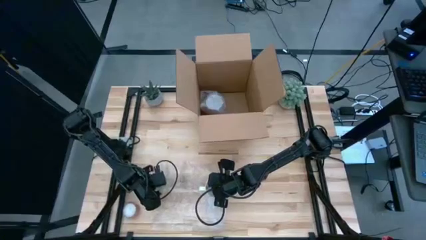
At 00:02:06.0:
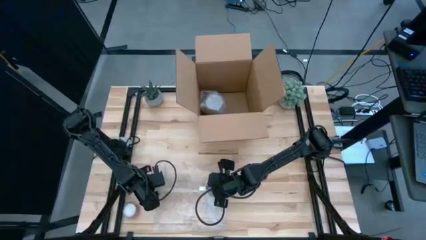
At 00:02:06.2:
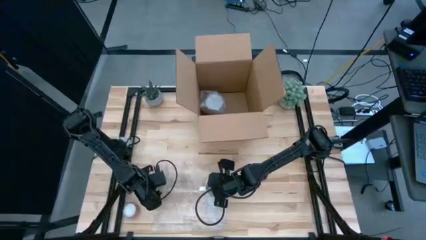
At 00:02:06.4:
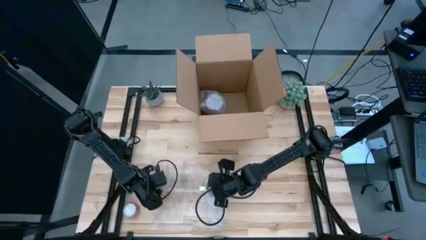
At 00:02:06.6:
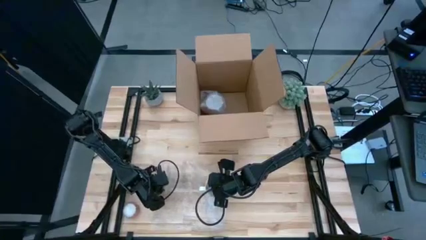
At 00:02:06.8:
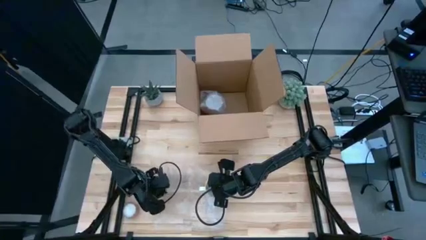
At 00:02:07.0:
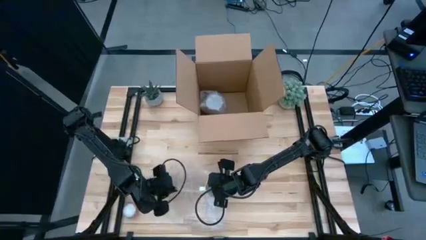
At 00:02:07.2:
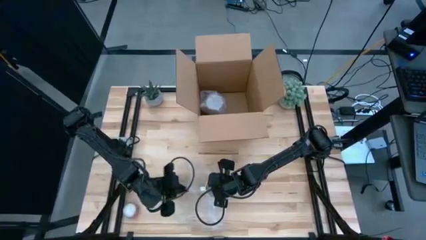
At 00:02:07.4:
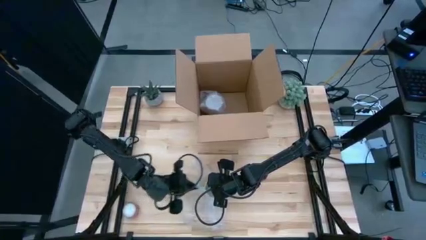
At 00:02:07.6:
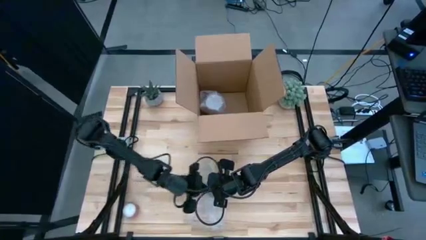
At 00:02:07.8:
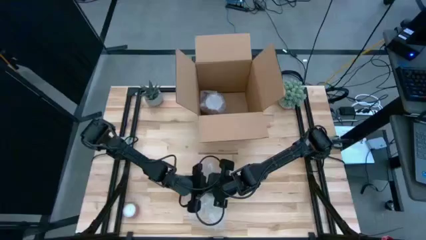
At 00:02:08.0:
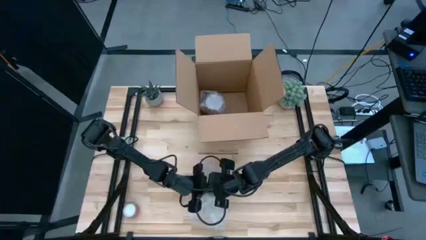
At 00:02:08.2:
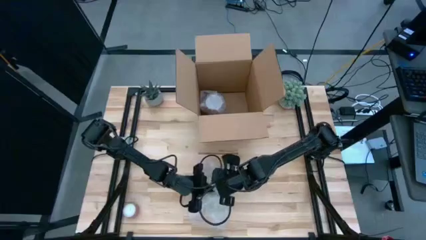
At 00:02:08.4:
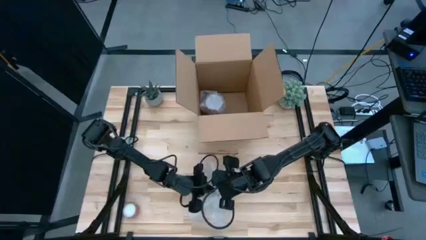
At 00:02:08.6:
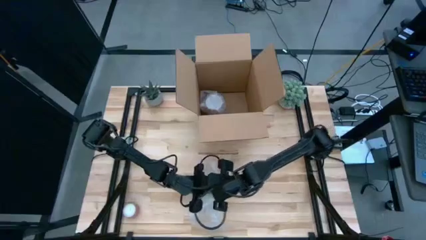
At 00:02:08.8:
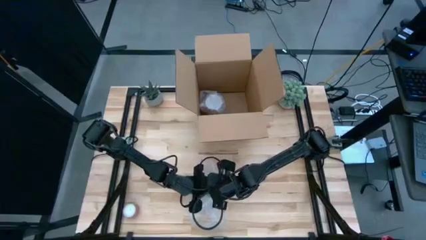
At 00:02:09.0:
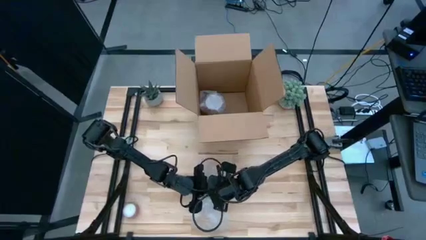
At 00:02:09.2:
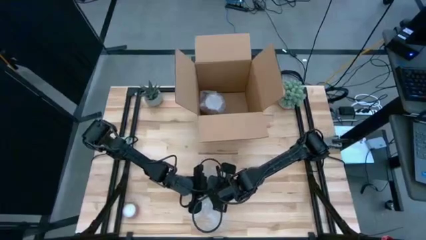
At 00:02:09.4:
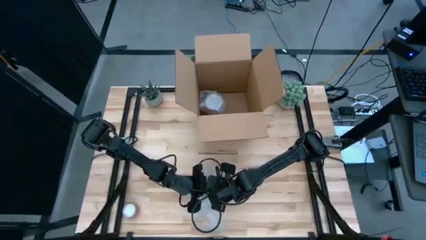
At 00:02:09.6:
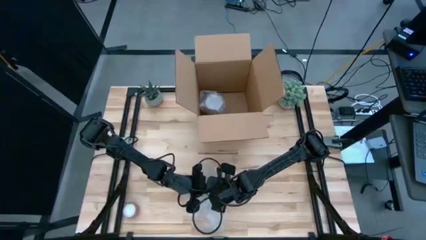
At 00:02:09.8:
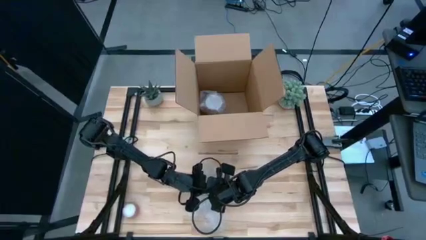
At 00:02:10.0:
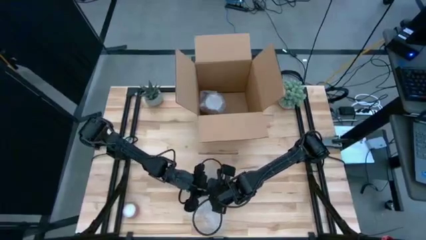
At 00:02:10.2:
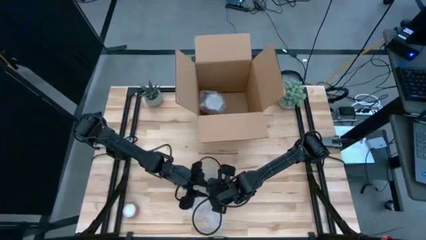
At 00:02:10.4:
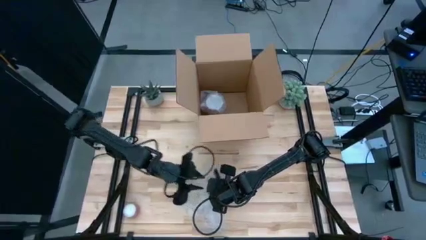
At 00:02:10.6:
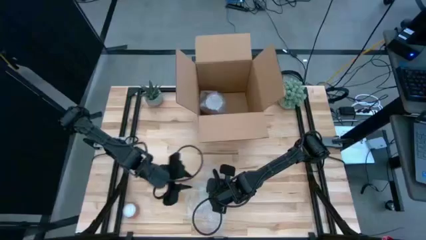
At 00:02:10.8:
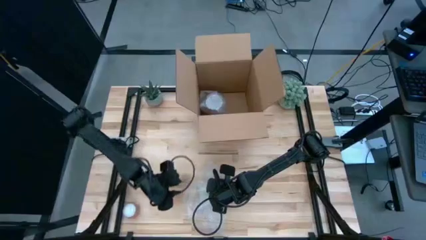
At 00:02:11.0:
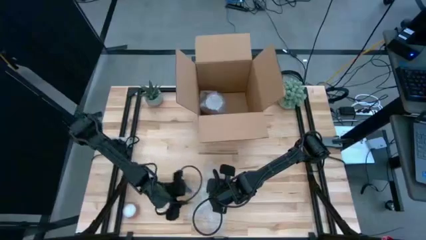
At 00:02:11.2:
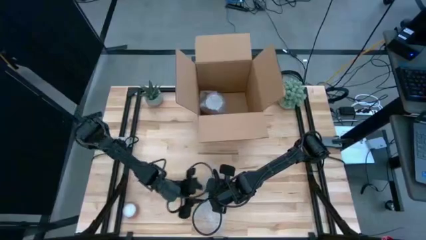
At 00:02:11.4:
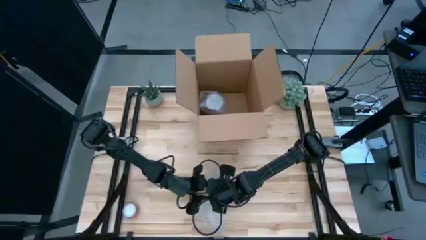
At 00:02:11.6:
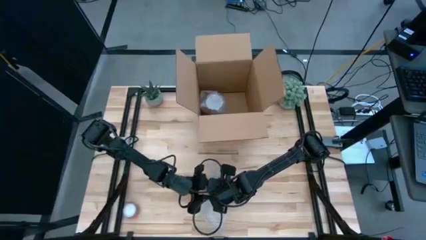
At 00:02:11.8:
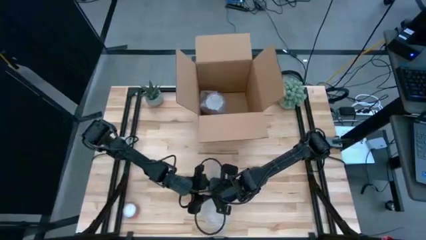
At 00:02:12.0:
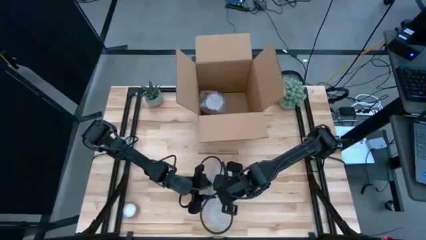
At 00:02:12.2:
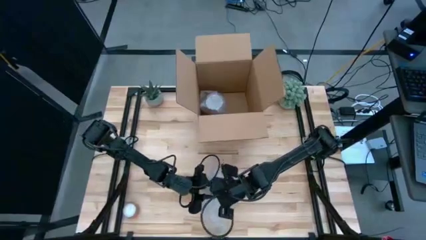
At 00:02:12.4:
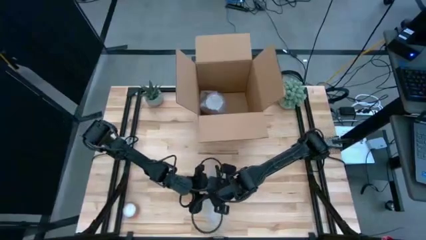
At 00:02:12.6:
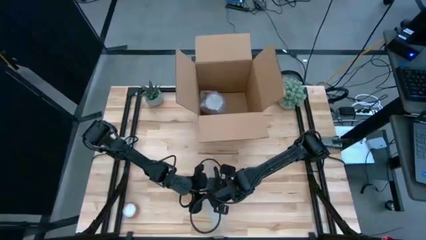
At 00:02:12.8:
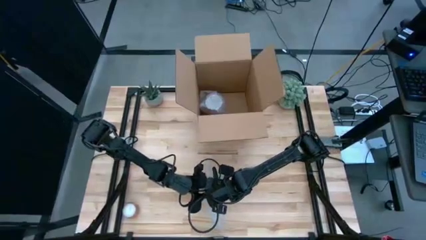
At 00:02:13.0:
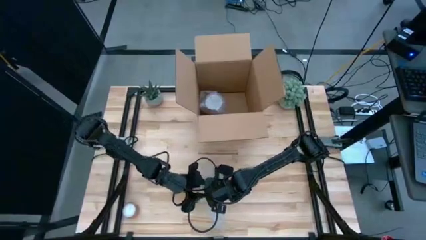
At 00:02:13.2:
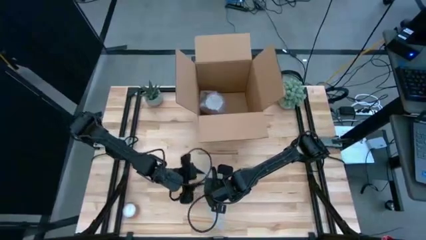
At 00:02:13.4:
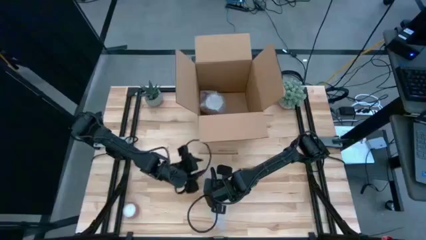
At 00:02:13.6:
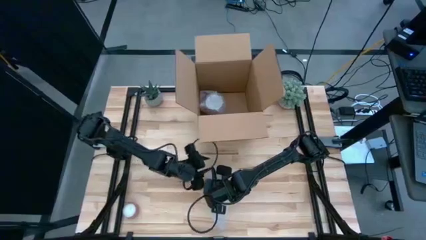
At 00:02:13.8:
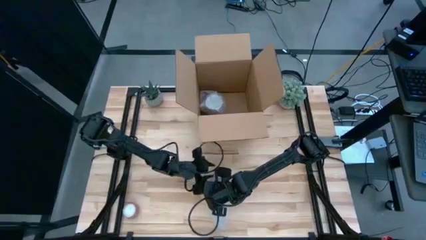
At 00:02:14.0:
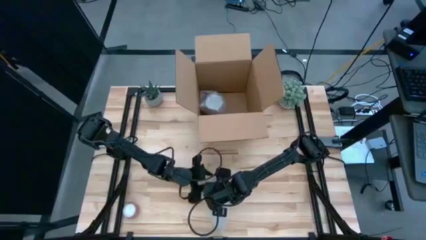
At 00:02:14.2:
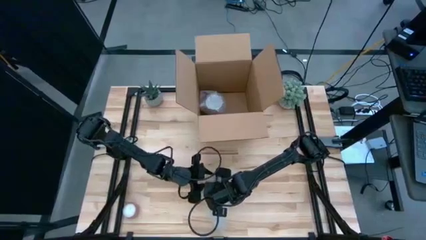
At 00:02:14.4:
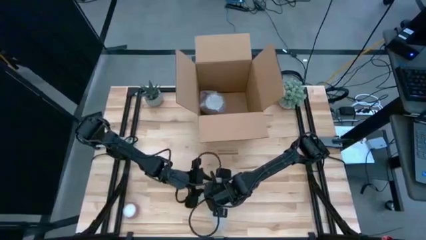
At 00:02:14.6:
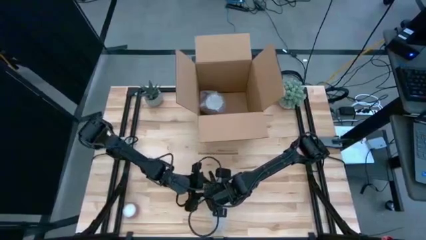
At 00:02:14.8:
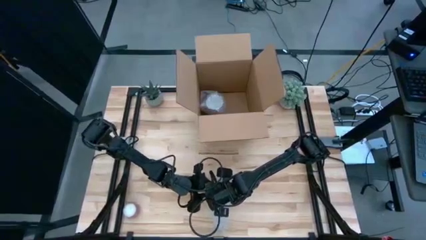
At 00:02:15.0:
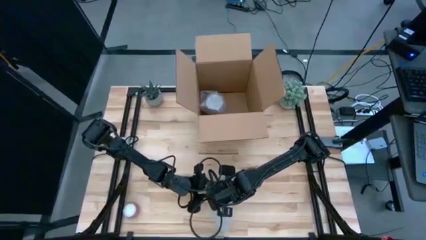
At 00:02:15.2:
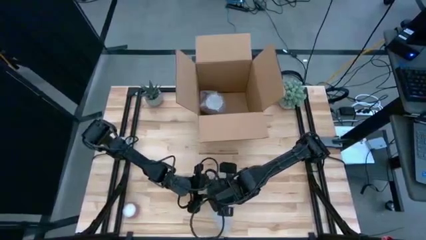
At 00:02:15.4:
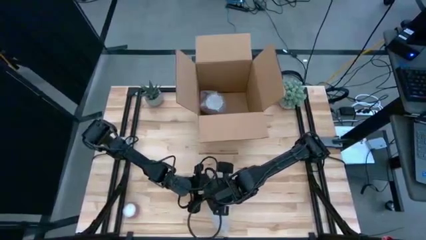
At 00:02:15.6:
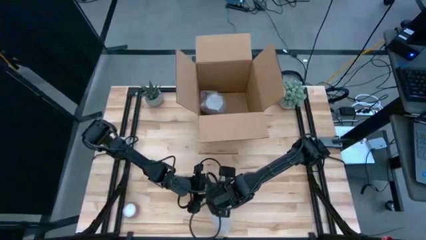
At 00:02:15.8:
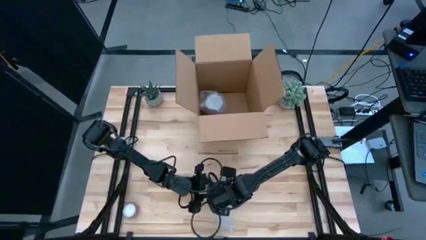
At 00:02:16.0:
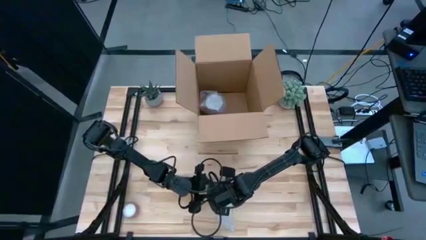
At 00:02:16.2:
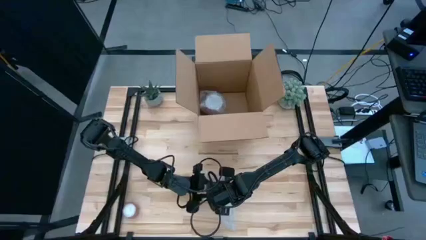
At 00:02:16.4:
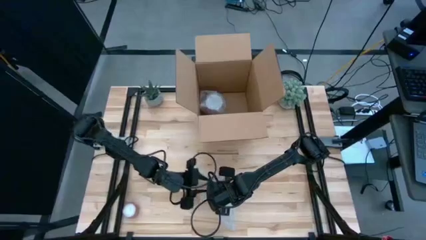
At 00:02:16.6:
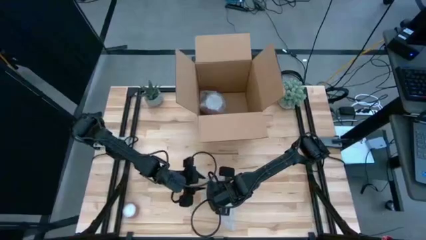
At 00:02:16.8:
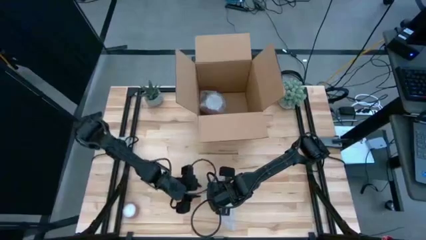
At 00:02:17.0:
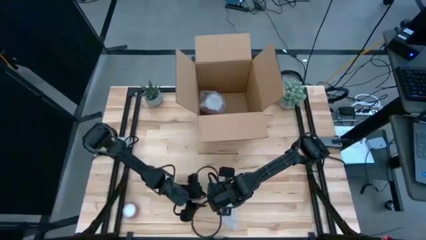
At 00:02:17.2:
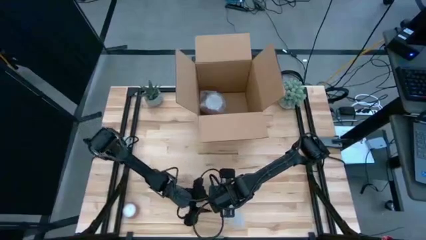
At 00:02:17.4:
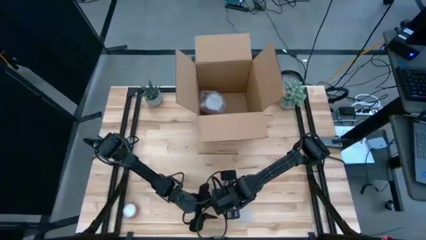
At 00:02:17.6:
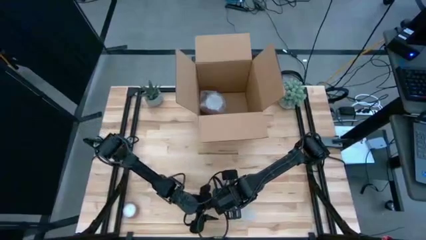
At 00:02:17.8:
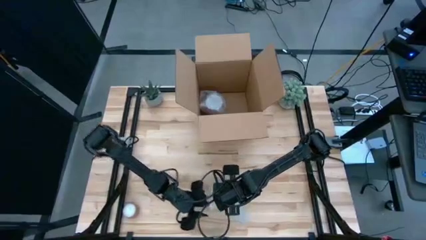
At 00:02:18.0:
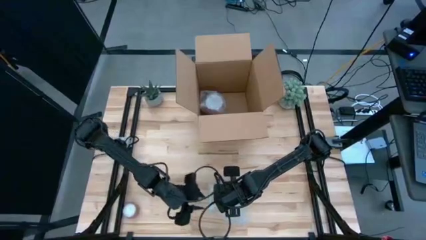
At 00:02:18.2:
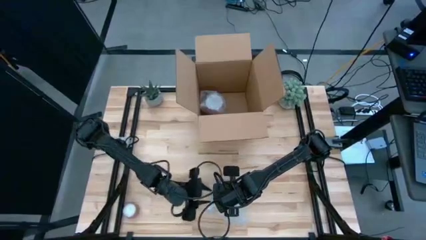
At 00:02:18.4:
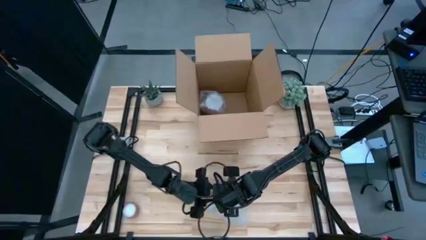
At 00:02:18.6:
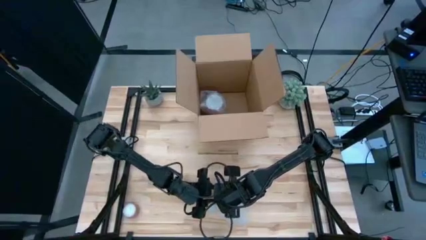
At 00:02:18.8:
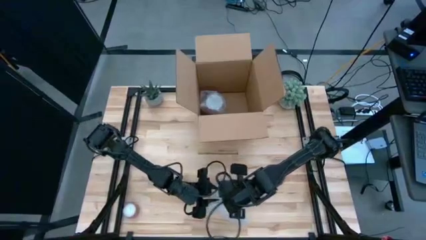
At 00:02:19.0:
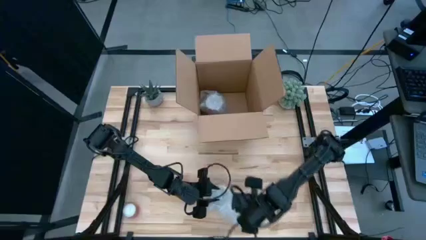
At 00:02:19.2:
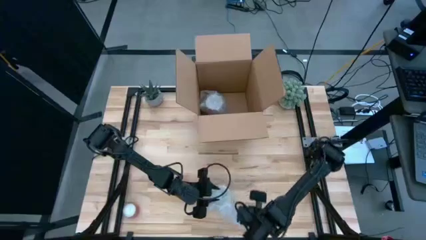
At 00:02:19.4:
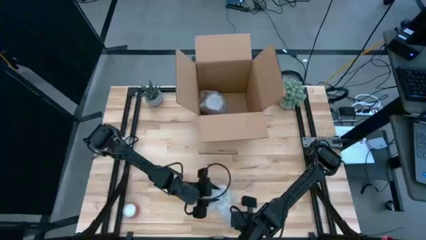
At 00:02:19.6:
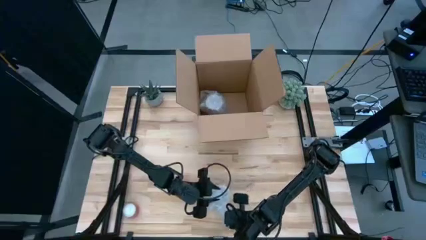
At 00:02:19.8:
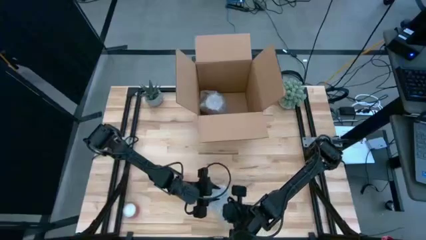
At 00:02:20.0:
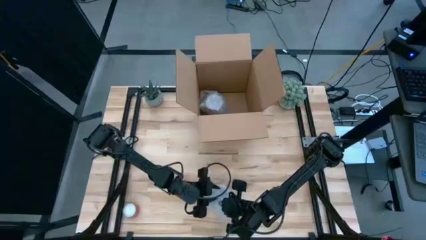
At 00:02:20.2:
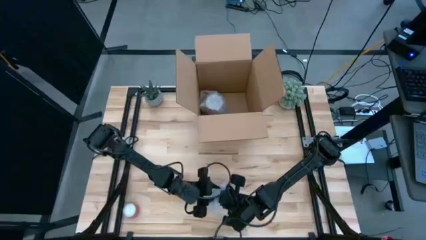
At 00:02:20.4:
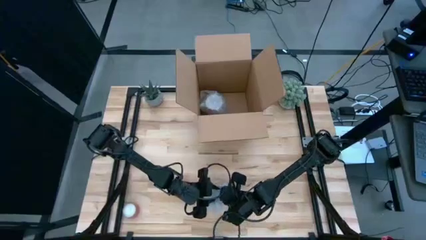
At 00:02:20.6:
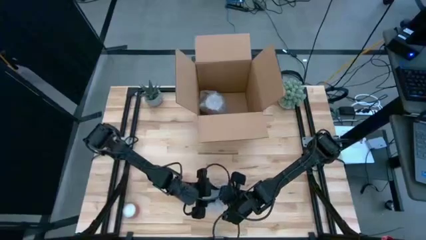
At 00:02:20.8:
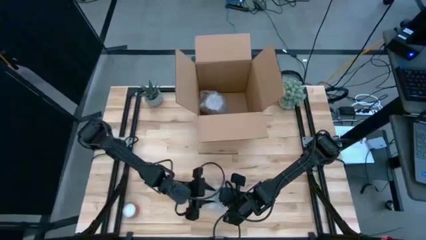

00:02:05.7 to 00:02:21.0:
Task: wrap mug
Wrap the orange mug with the transparent bubble wrap
